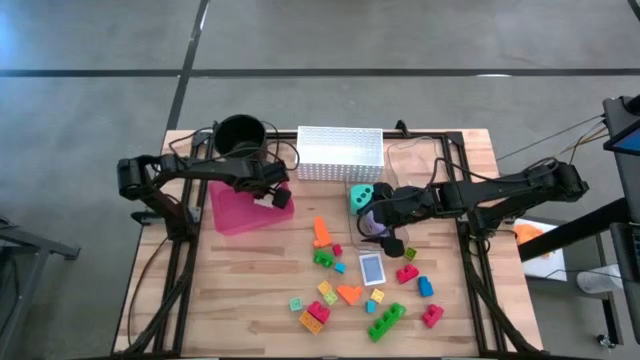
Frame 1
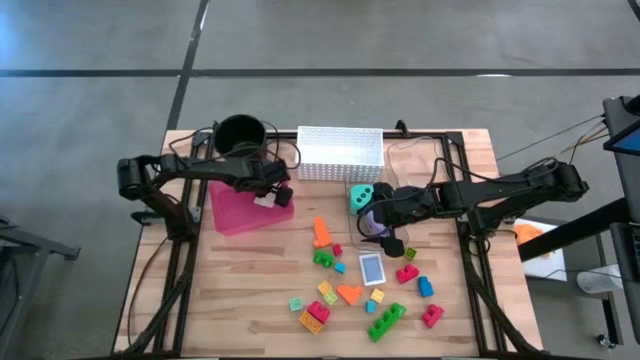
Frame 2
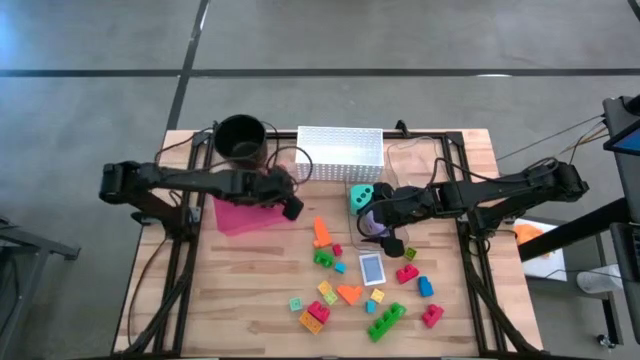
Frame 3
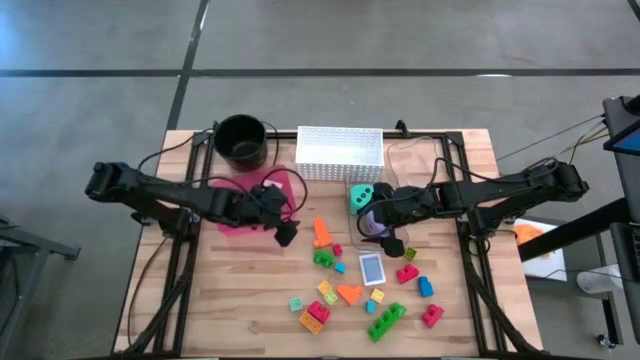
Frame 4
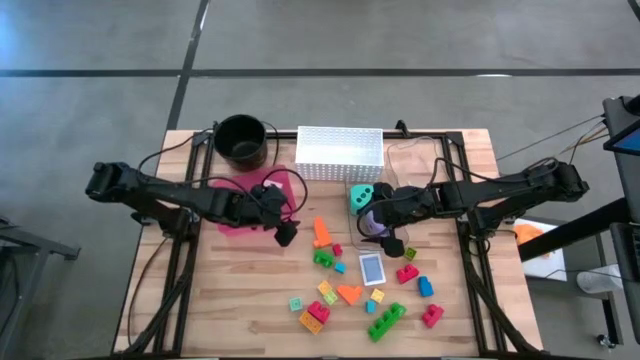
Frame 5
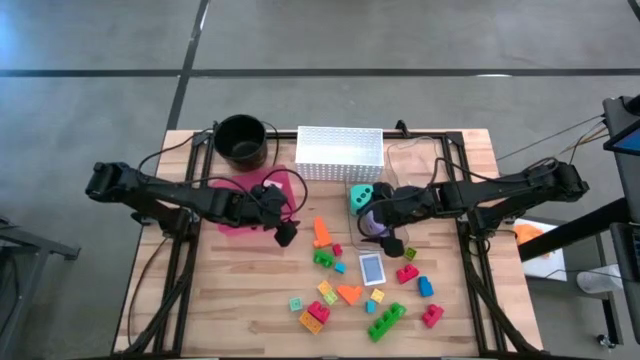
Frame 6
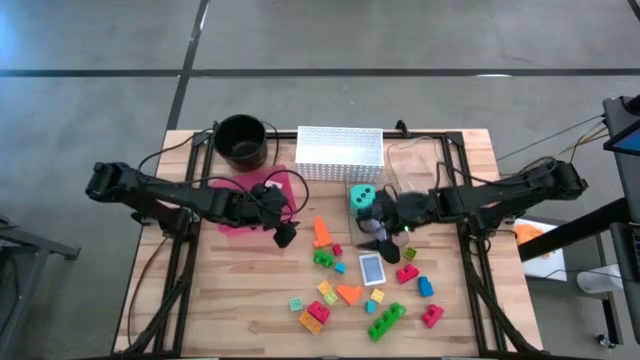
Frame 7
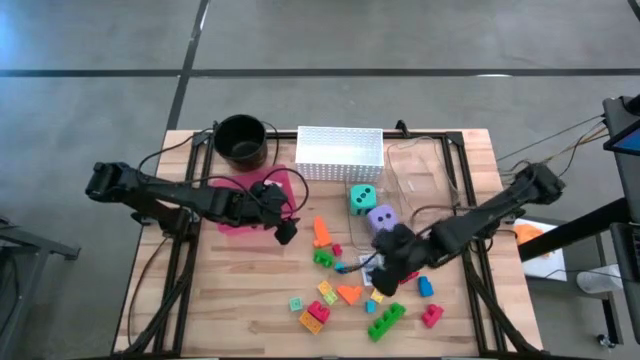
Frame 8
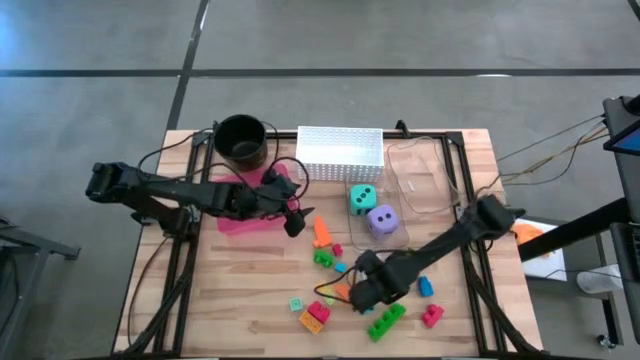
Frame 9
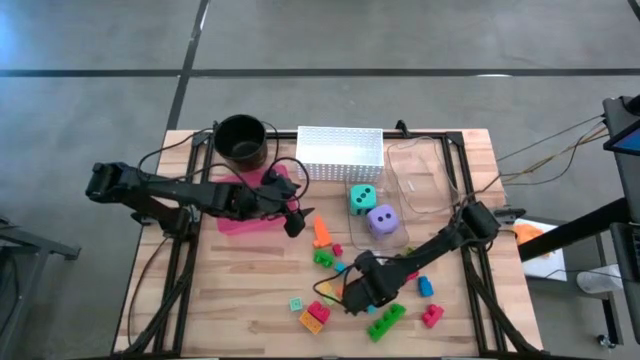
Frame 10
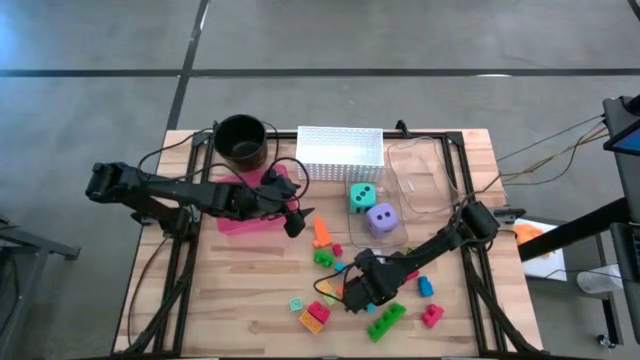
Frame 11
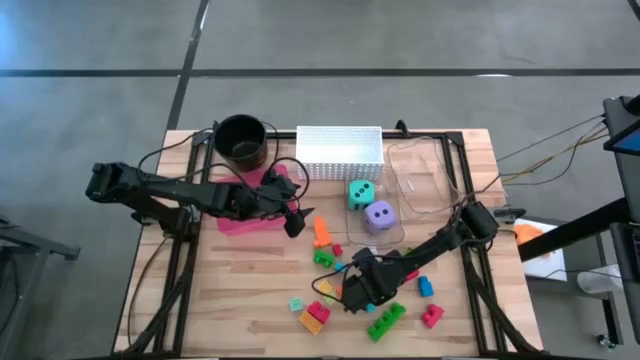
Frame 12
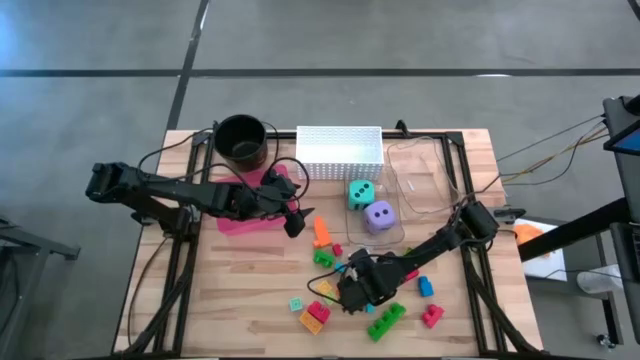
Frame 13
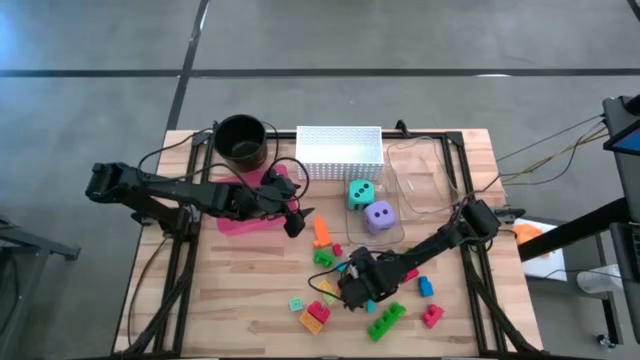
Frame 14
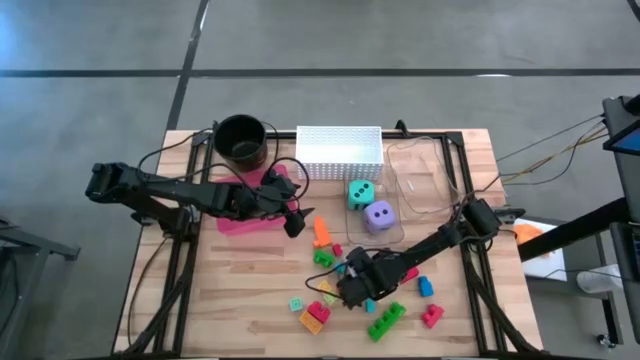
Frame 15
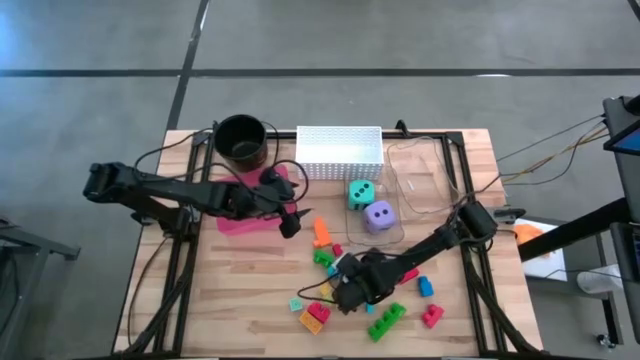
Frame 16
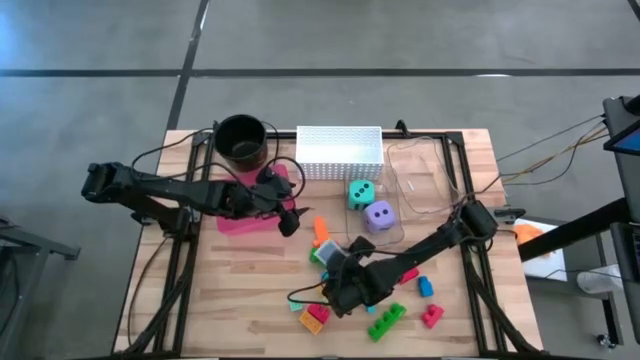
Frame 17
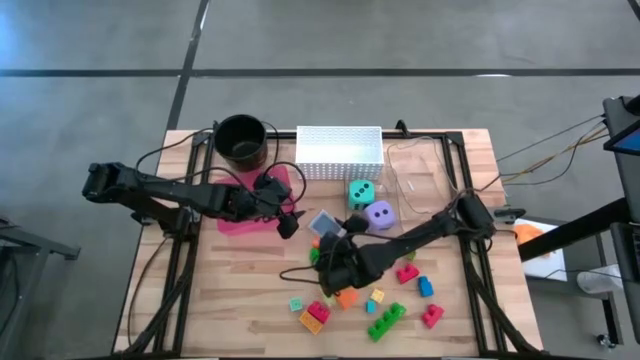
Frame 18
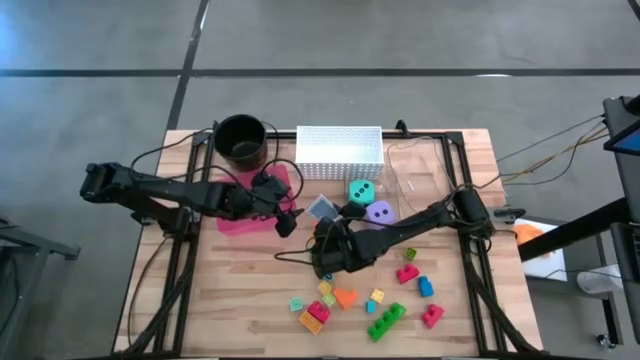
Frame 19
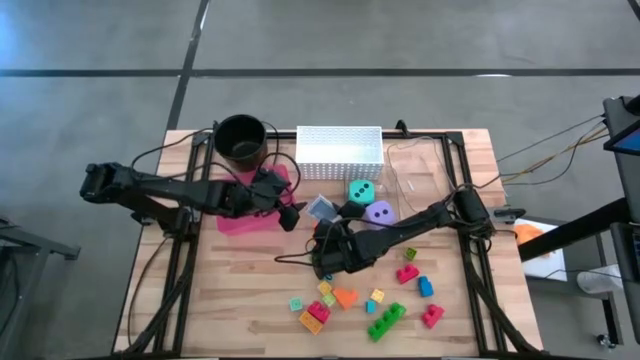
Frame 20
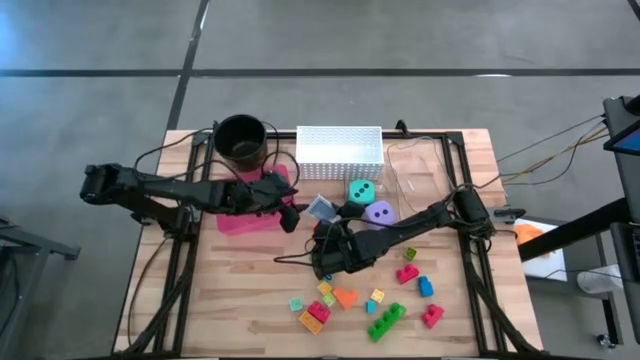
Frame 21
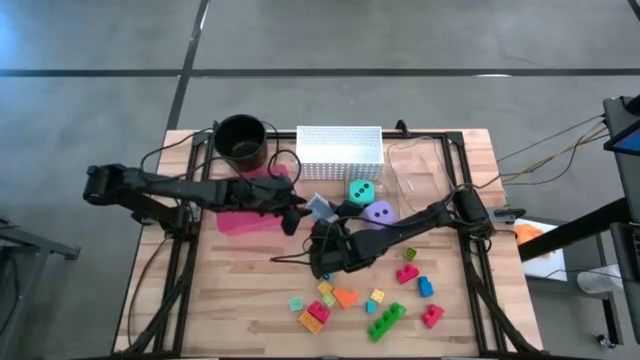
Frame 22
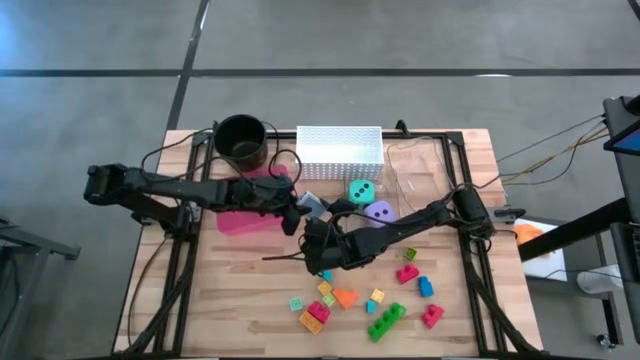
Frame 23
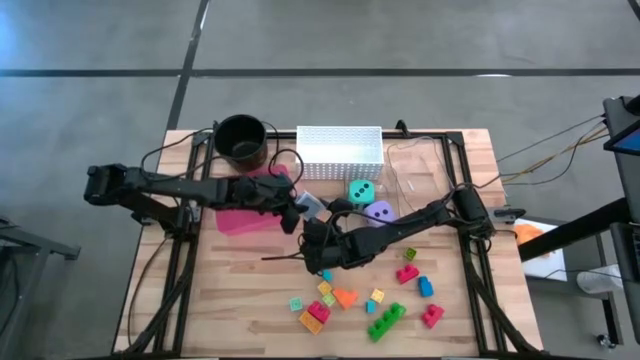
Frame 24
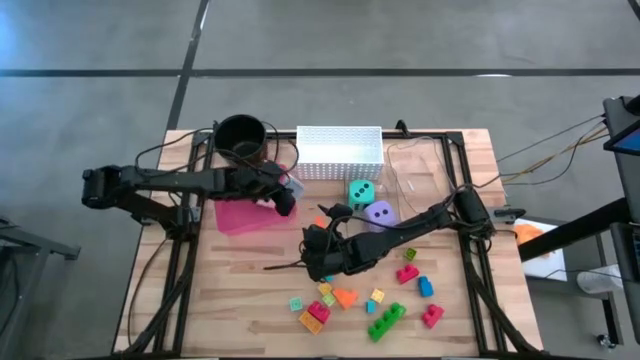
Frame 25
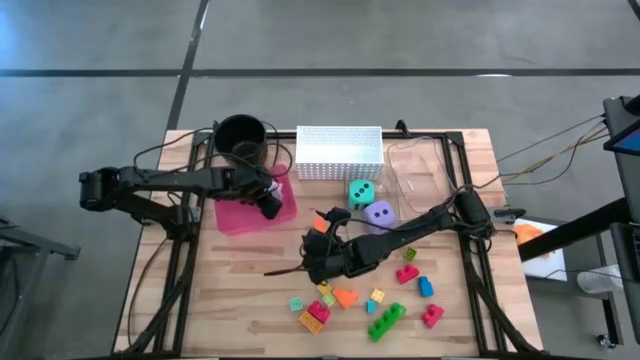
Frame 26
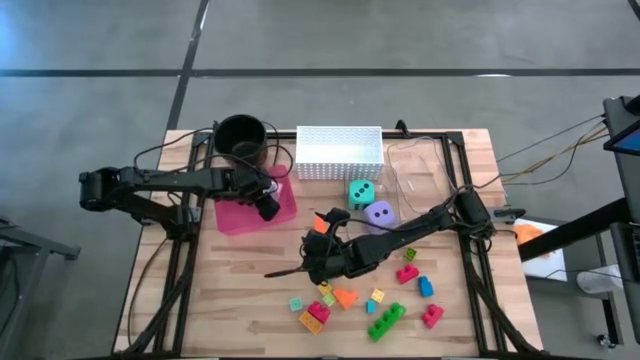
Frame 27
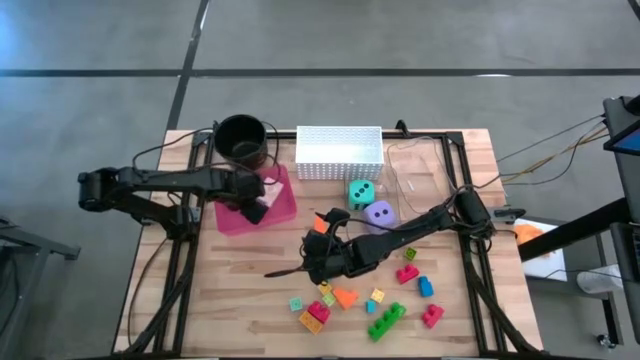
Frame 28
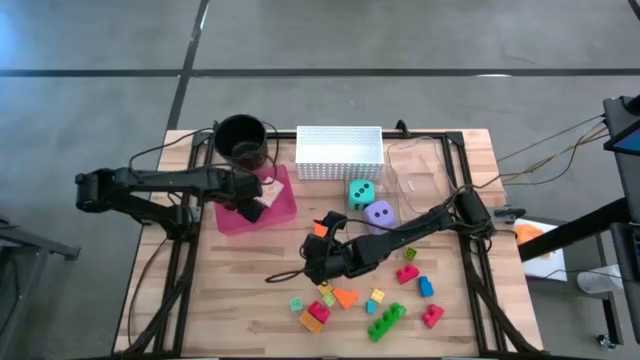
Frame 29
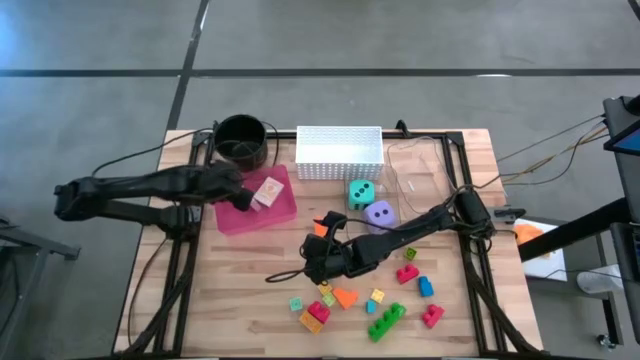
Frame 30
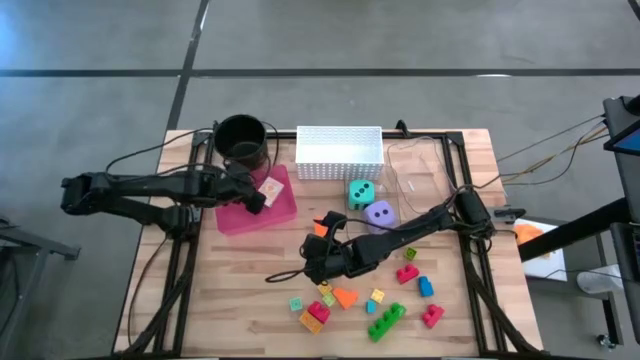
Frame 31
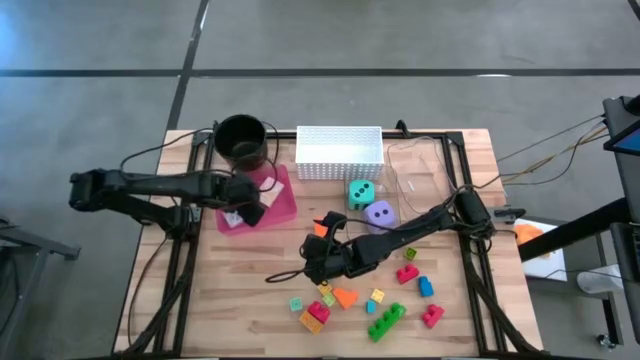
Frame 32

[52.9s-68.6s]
Task: Pick & Place Toys
Put the blue game card into the pink bin
